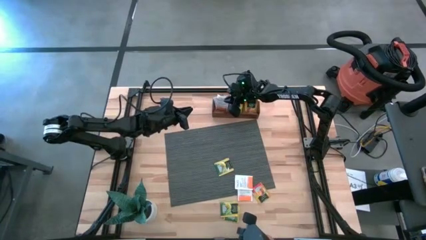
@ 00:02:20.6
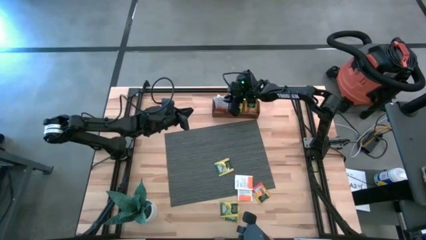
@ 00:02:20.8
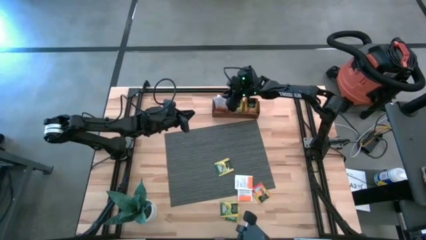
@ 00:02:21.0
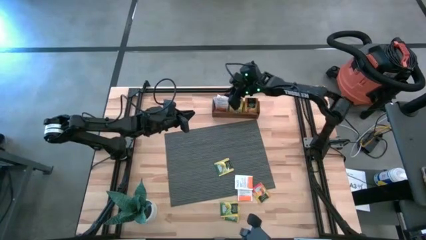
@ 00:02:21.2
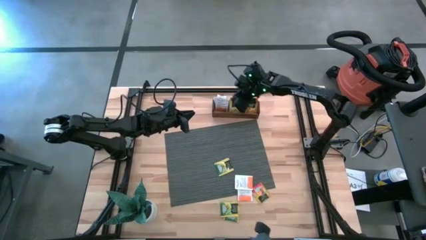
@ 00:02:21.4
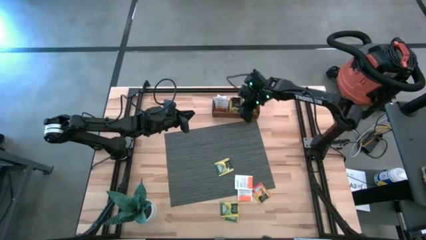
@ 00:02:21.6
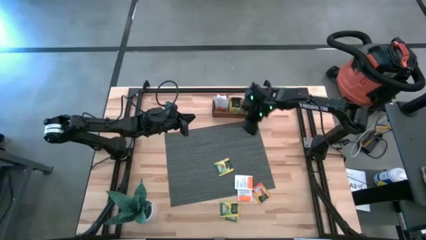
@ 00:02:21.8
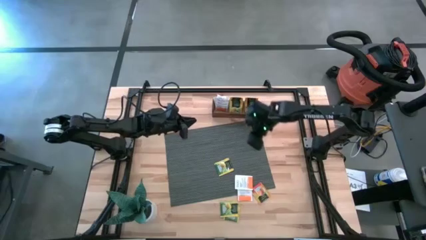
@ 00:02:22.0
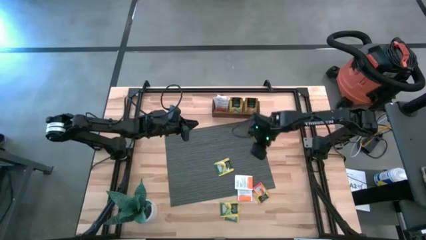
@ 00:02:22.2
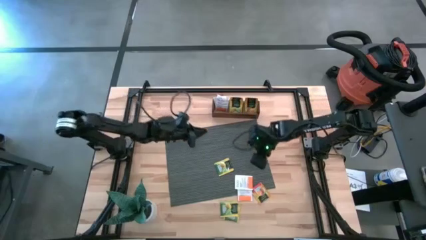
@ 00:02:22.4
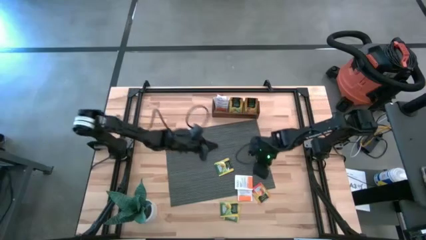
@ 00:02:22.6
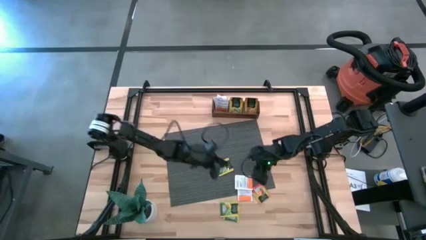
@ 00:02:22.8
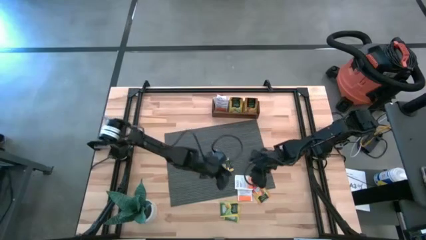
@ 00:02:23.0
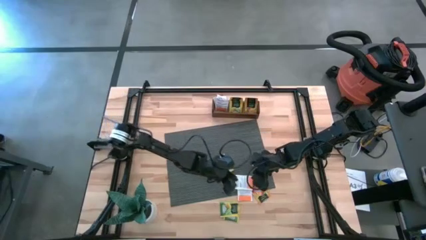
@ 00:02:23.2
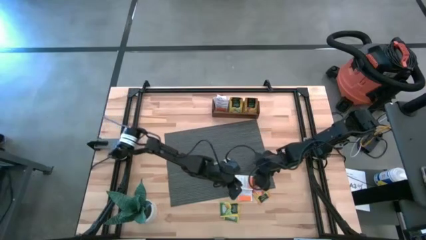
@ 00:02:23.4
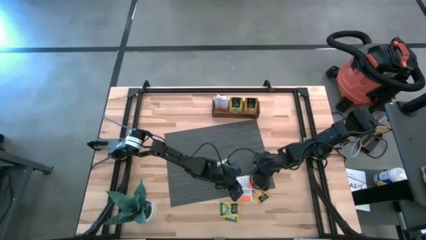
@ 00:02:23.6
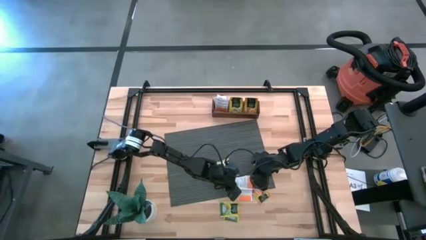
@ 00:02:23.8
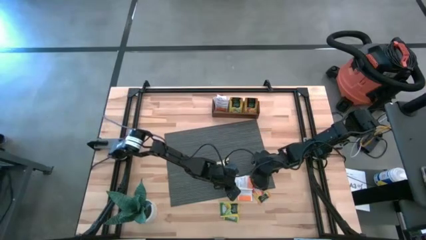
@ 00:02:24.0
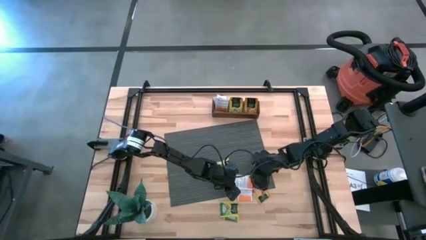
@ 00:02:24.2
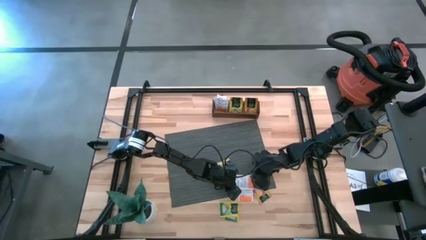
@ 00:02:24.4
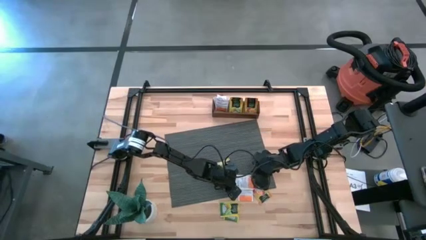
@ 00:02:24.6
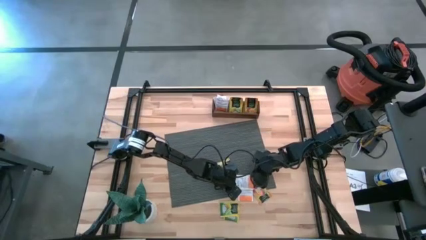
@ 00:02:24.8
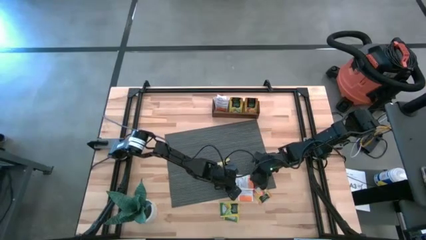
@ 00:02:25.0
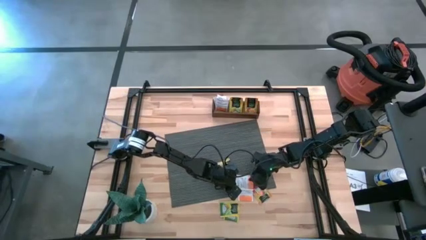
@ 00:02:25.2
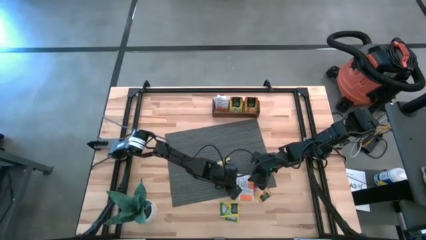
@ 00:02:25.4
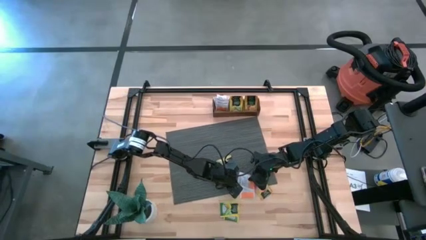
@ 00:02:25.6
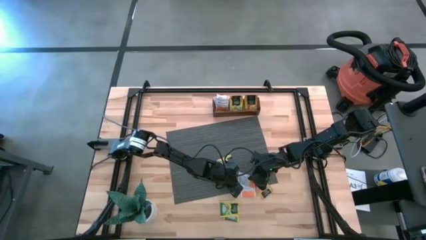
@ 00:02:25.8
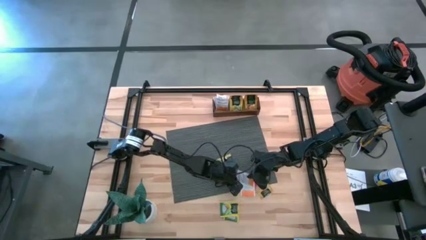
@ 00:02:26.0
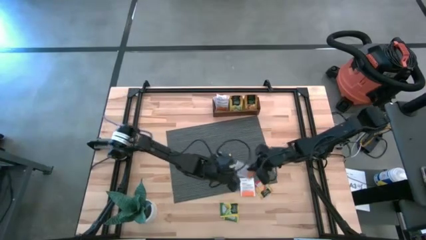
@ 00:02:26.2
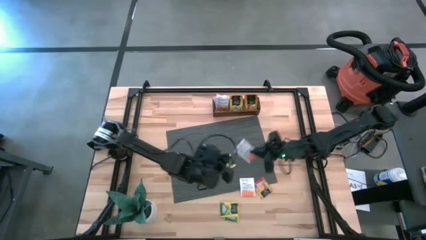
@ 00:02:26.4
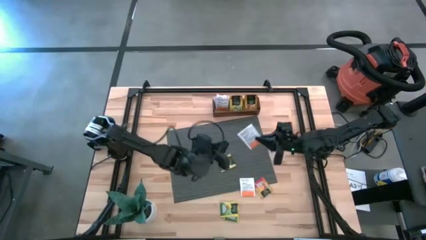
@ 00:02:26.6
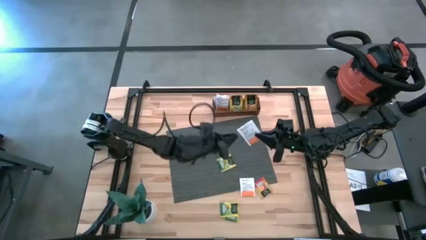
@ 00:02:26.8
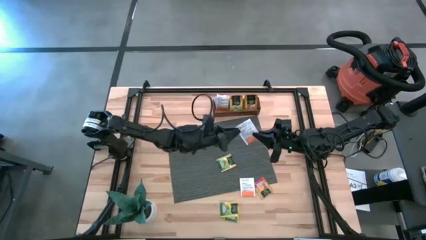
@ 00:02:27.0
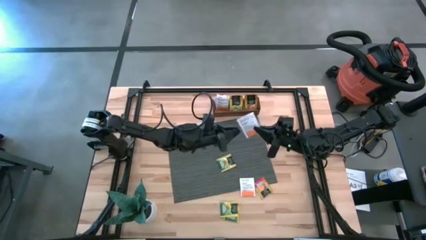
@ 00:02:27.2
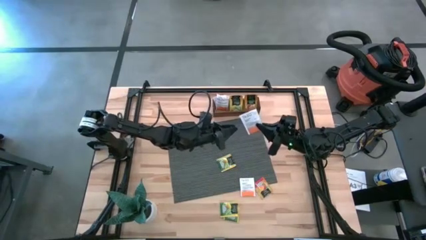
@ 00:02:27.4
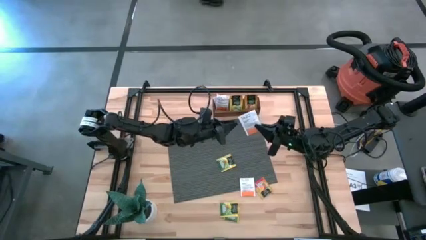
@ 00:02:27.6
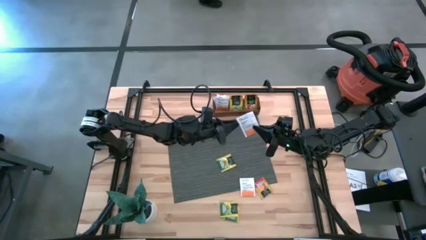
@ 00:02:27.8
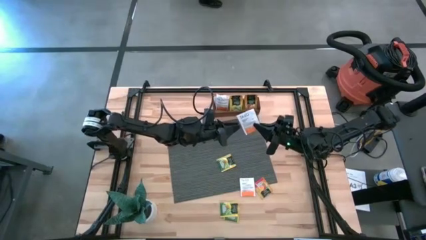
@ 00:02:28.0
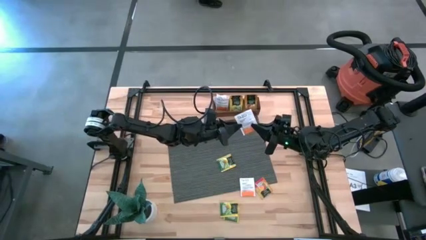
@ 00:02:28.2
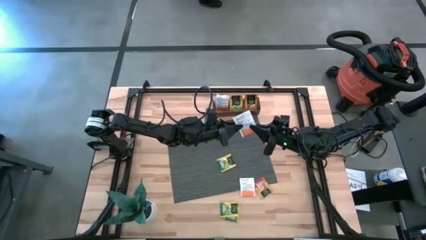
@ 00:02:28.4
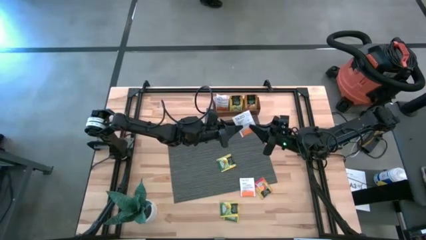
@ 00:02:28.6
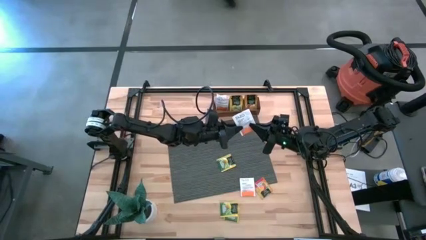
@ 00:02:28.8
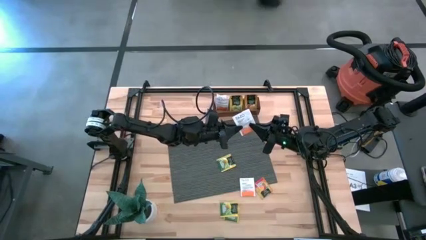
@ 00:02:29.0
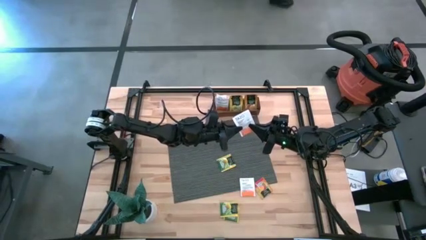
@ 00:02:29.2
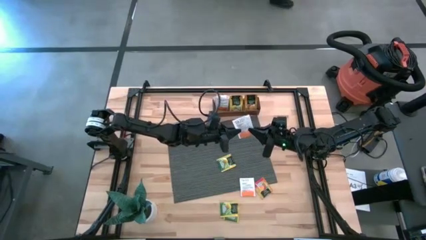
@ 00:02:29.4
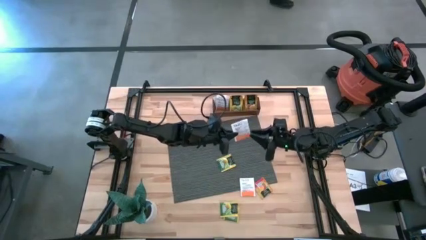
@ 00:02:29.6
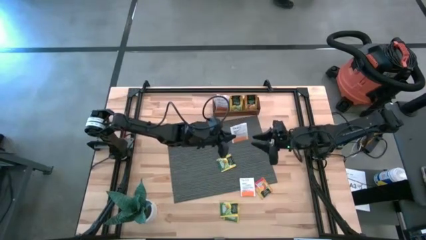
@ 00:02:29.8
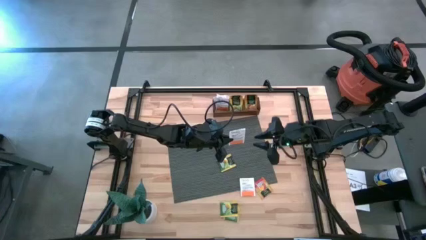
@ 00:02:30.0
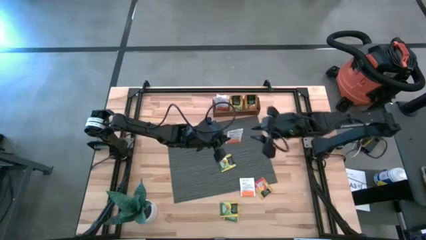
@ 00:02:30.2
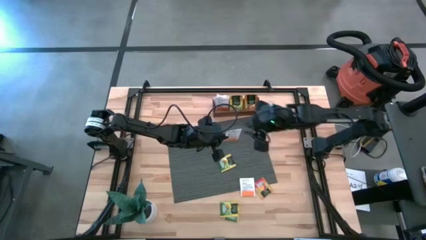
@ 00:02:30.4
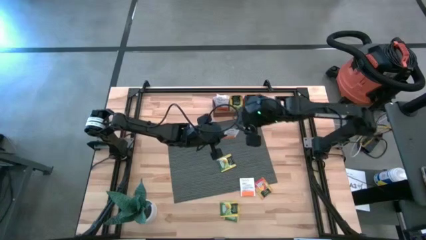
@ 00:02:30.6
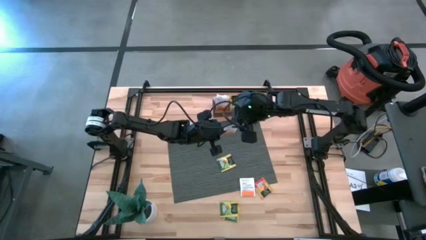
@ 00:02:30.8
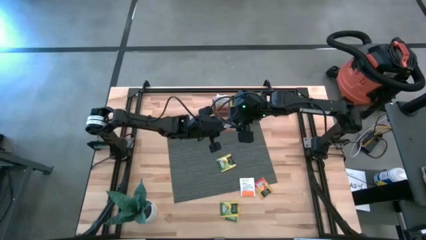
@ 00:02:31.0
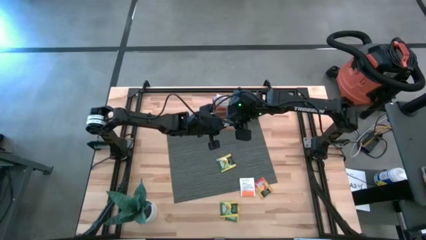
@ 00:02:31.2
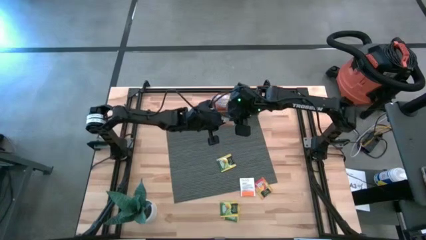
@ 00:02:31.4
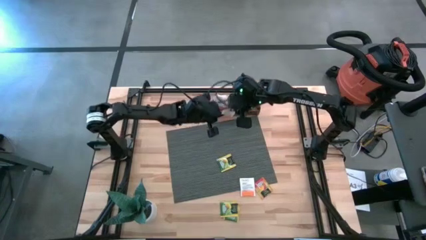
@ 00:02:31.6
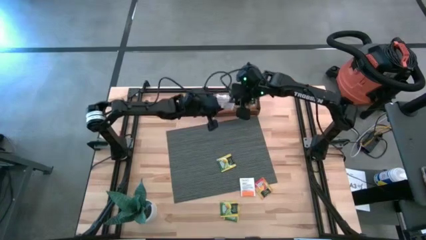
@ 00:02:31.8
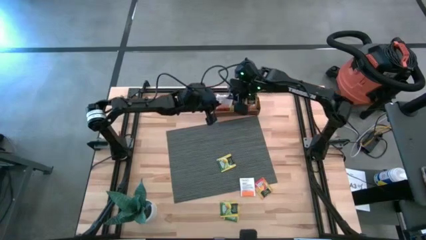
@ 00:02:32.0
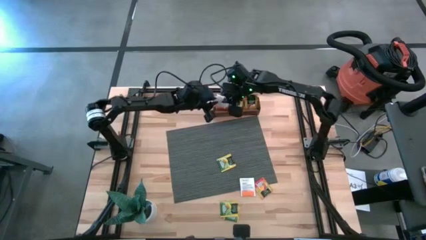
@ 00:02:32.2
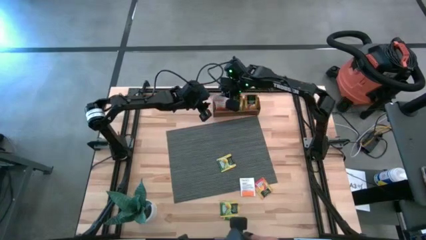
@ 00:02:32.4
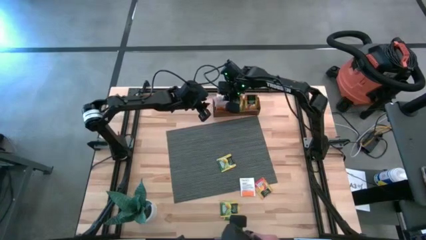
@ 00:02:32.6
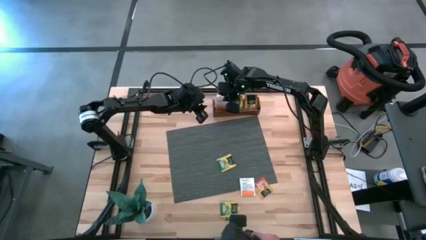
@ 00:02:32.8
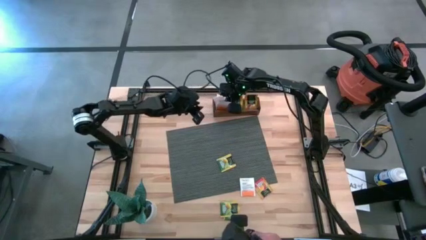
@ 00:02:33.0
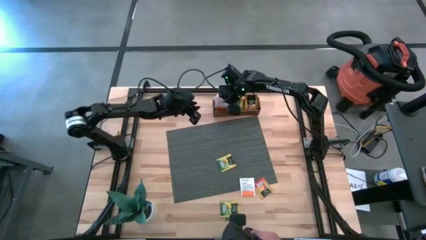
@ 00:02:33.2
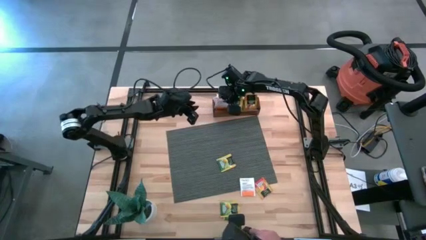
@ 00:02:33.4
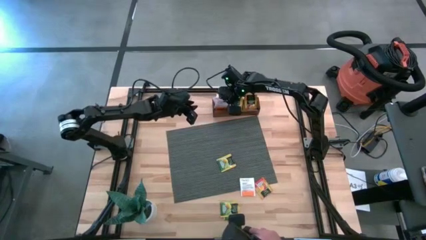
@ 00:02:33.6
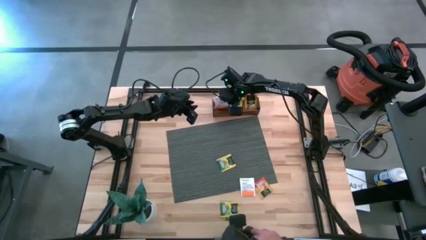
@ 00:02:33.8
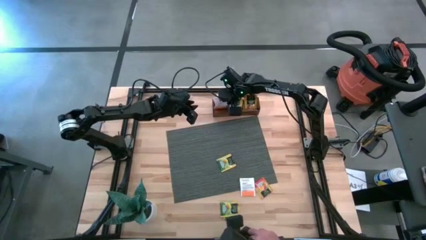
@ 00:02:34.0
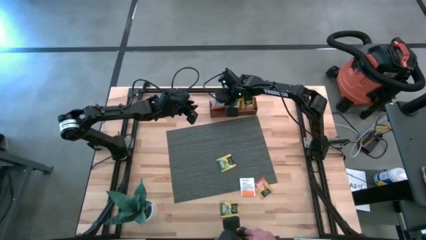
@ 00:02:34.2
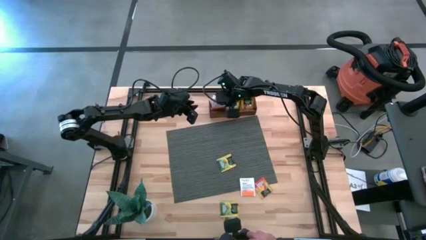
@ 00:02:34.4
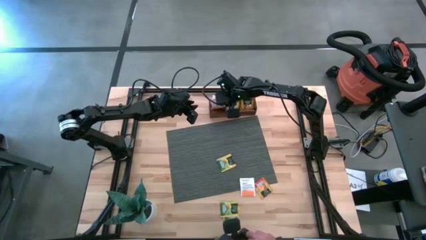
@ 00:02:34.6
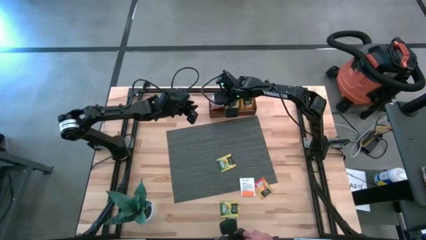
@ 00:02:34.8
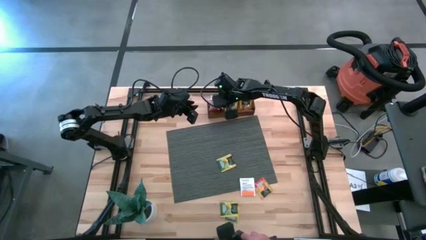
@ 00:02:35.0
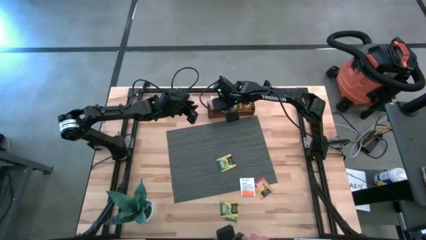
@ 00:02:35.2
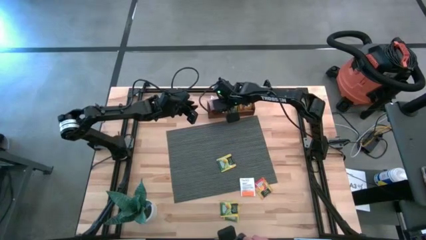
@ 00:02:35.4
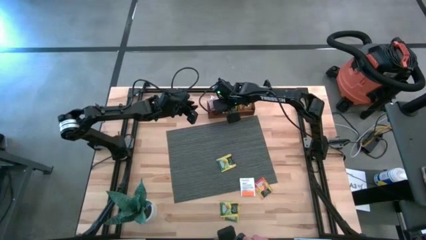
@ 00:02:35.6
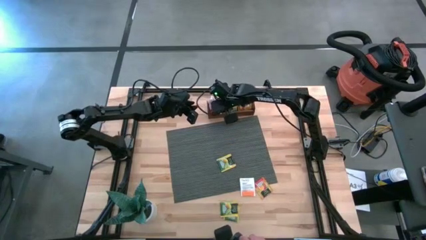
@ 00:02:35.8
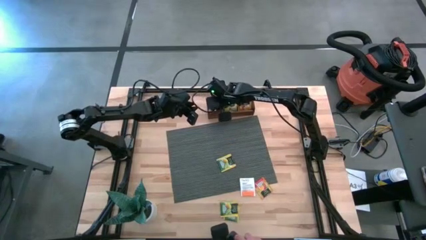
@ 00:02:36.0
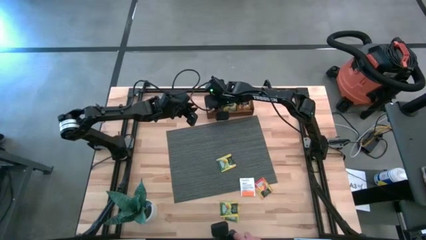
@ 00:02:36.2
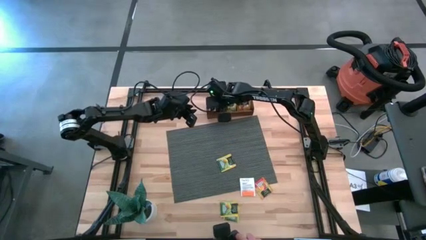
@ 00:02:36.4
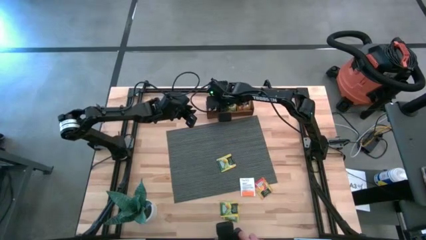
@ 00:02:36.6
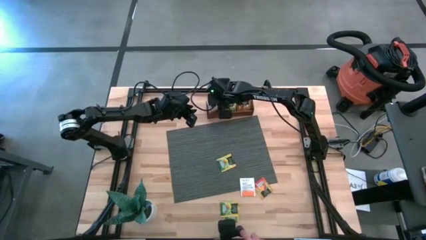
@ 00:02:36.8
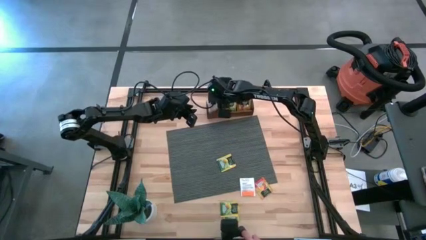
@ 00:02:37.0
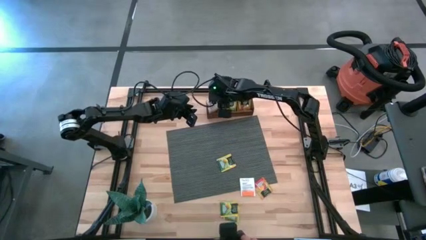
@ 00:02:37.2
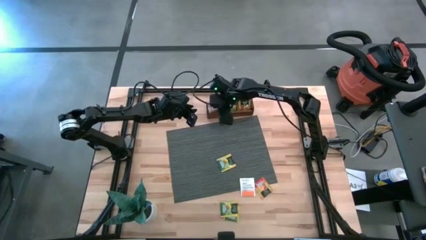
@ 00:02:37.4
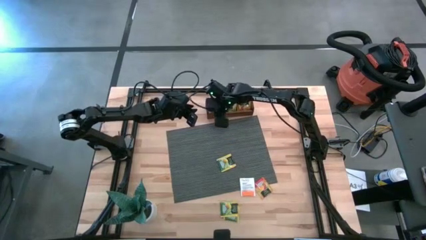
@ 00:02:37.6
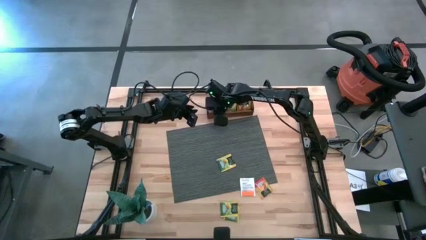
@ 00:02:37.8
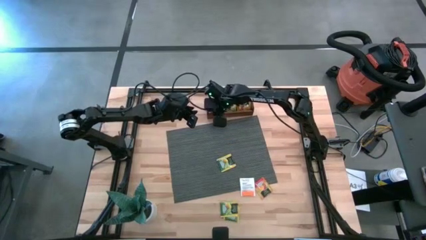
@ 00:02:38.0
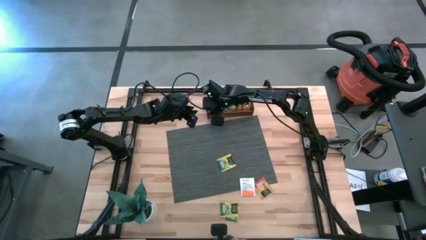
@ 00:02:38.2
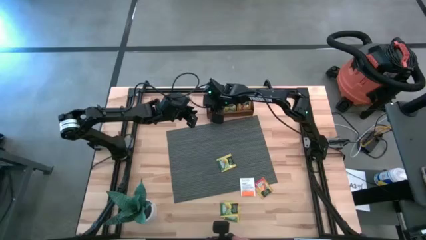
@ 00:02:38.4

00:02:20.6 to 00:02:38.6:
Task: Pick & Place Tea
Put the white tea bag into the left section of the wooden organizer
